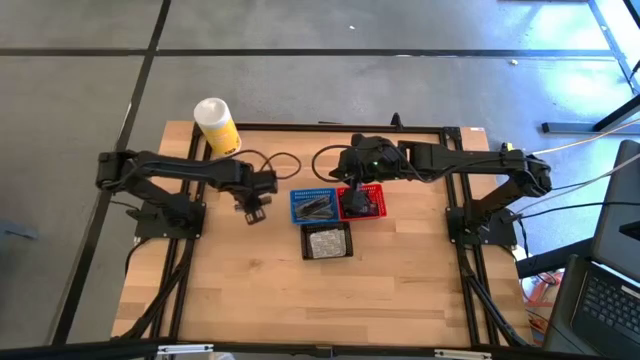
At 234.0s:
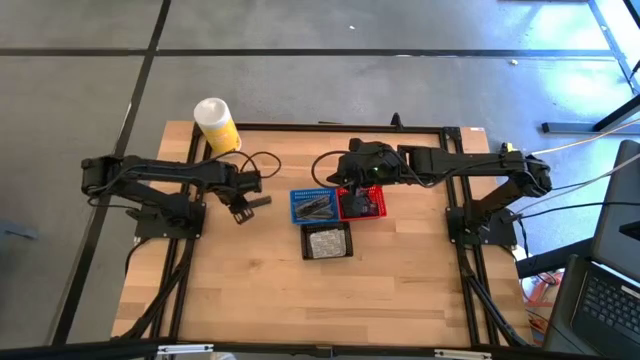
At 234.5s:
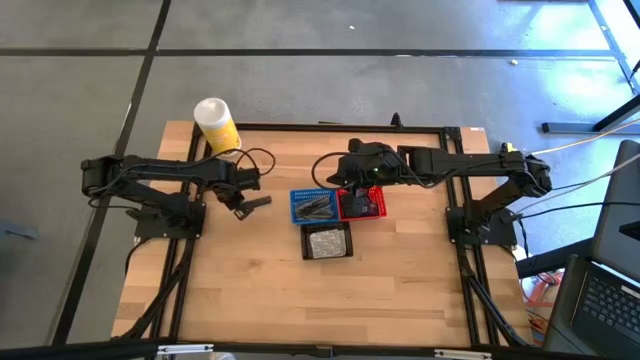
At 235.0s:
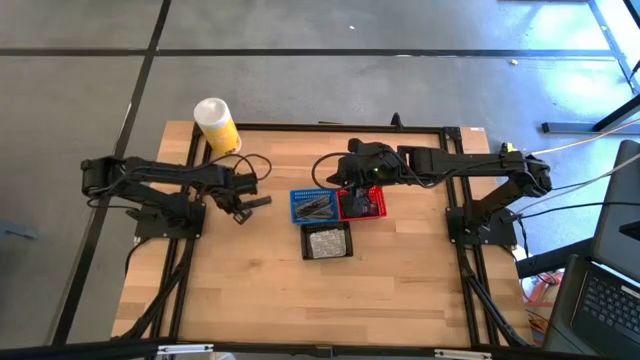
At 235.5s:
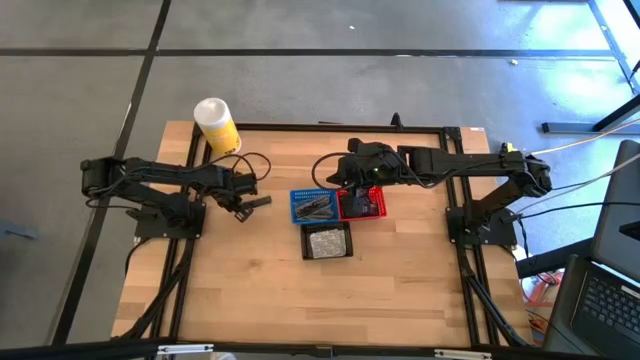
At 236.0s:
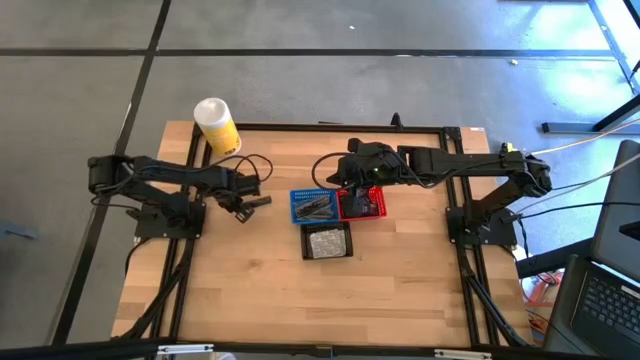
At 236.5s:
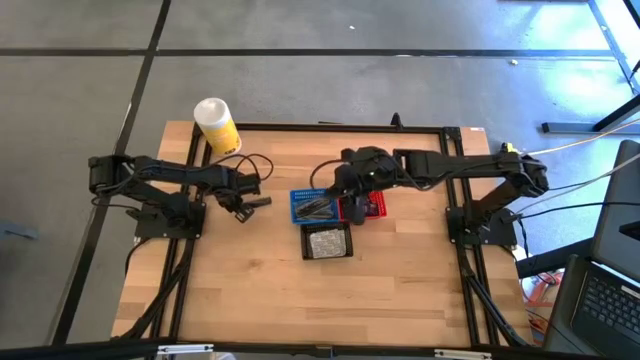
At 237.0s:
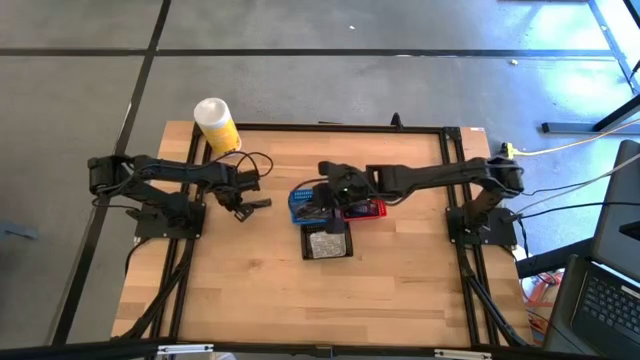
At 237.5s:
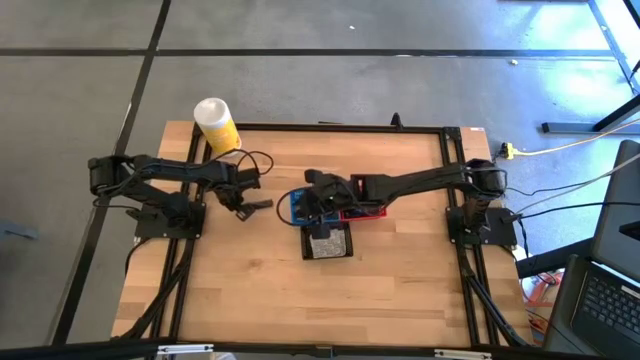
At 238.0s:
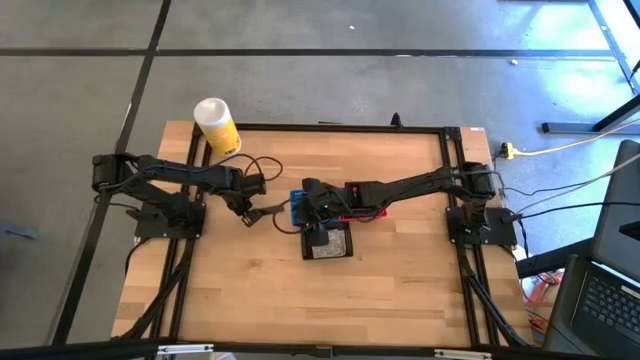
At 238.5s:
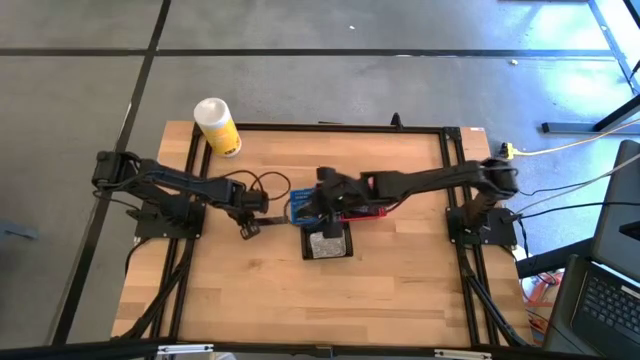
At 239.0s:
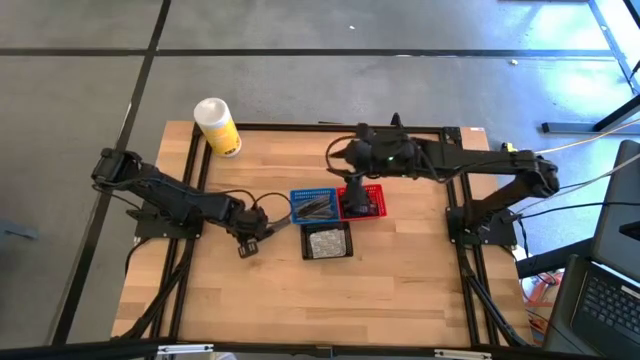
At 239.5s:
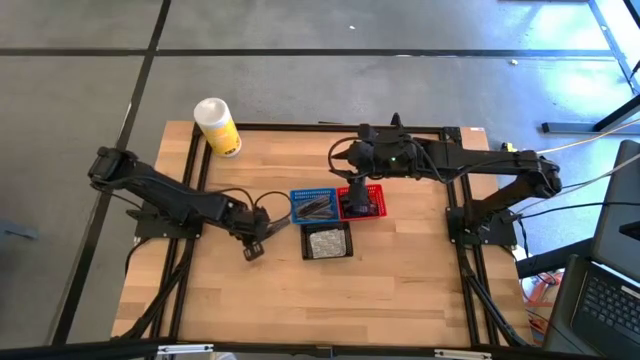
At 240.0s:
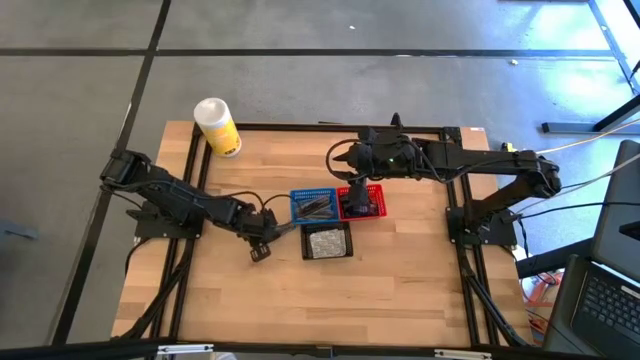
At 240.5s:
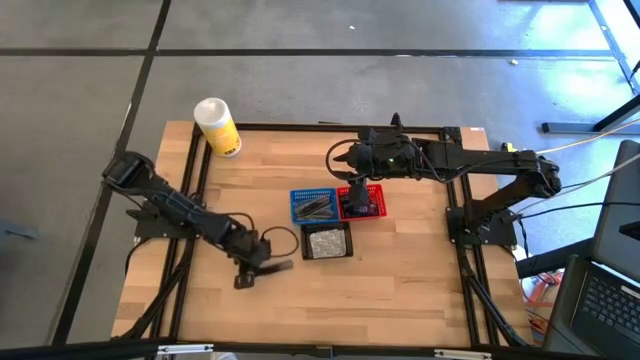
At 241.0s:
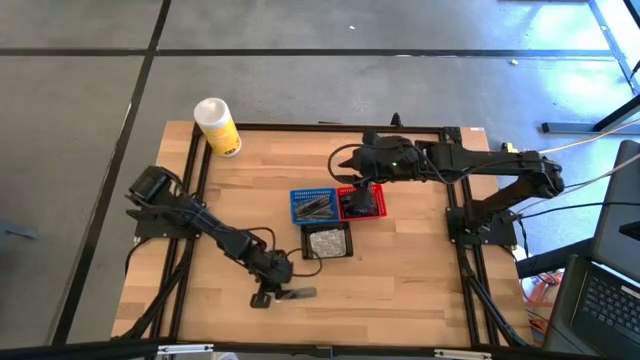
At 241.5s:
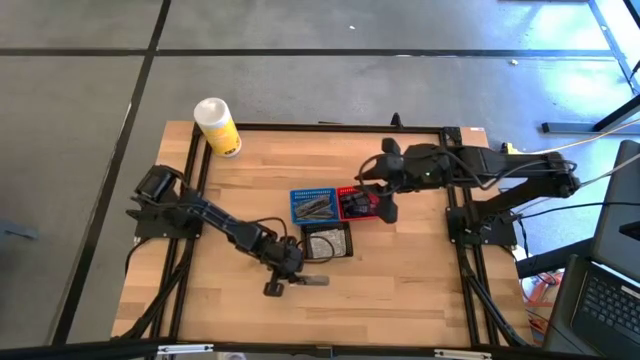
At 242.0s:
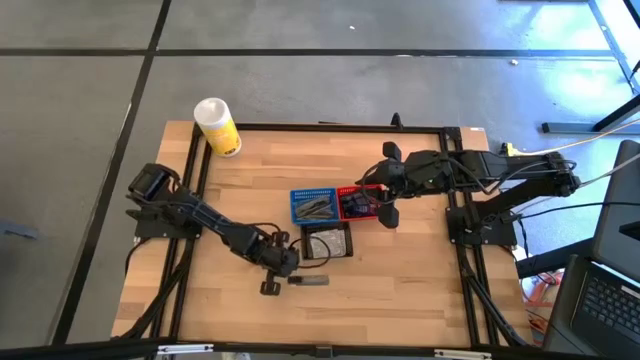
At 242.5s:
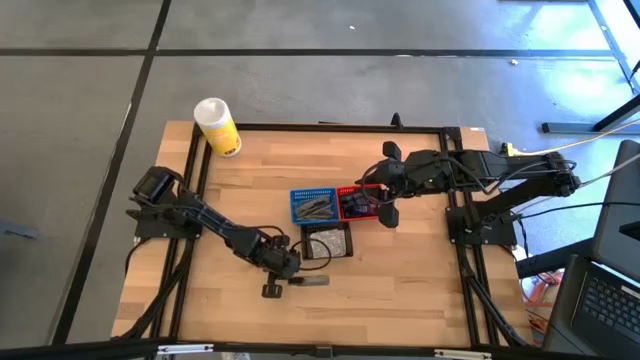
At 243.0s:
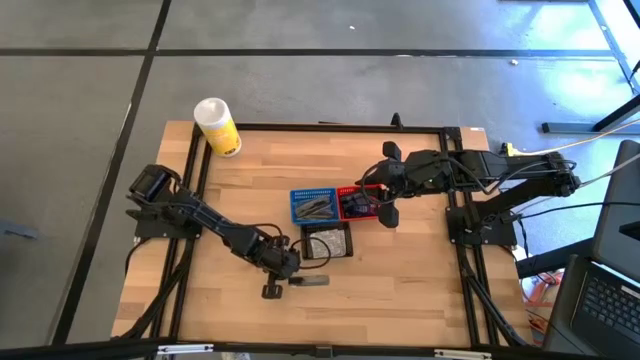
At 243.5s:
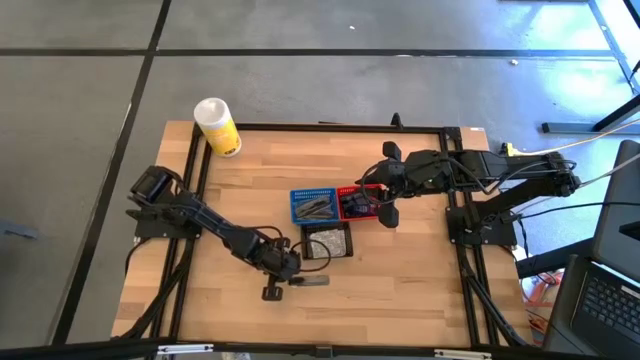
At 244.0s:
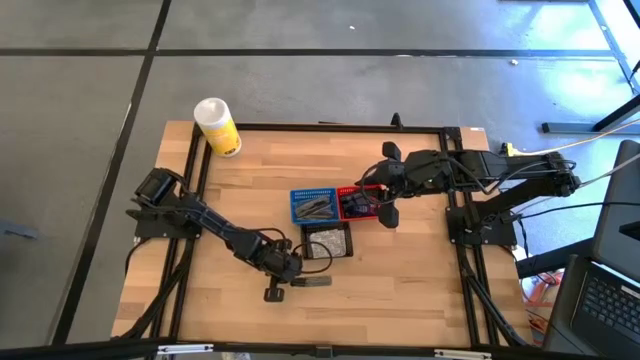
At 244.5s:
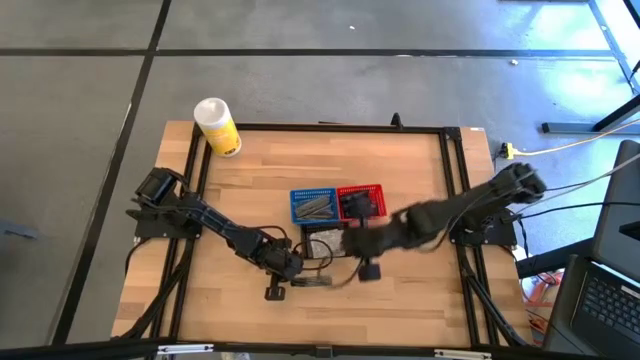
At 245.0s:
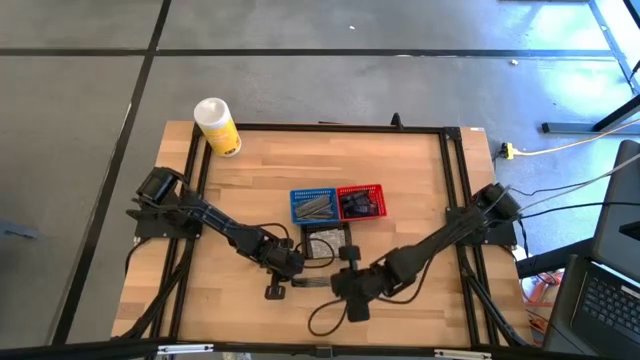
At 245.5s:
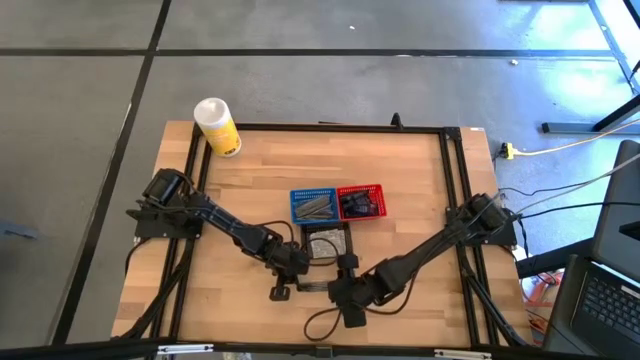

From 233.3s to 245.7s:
Task: Pick & Place Travel size toiletries
Put the black comb into the blue bin

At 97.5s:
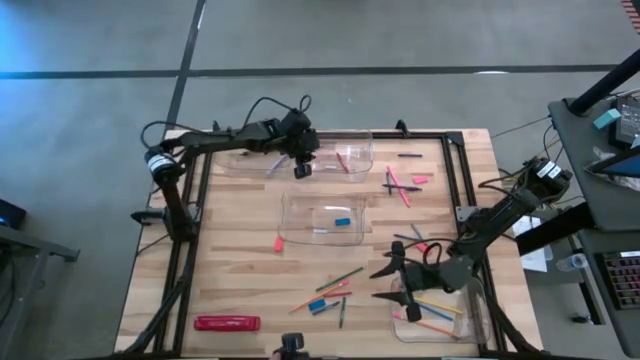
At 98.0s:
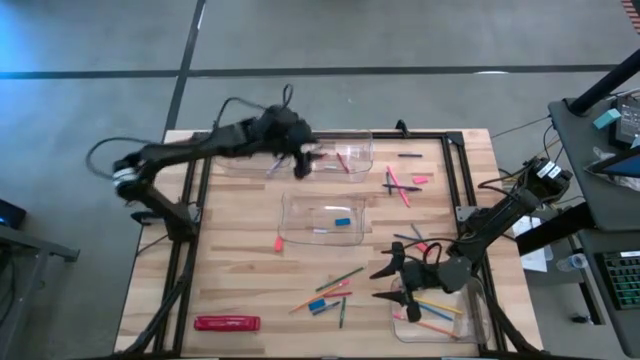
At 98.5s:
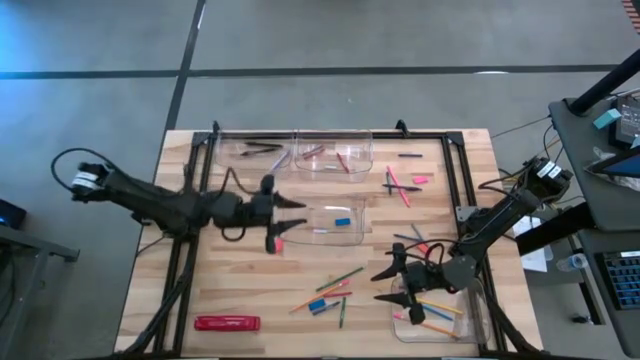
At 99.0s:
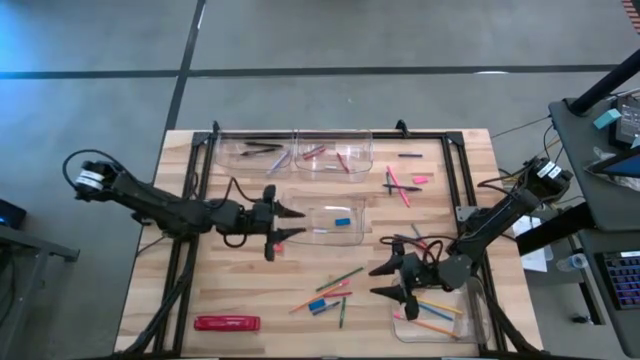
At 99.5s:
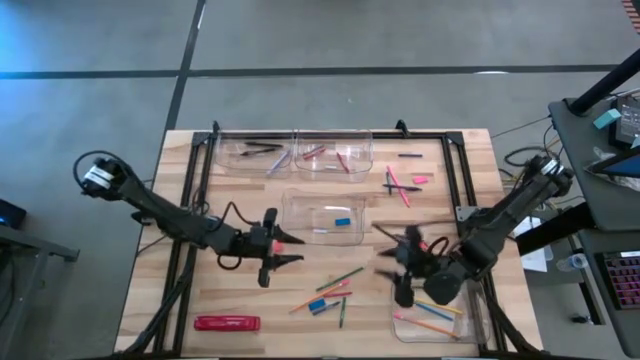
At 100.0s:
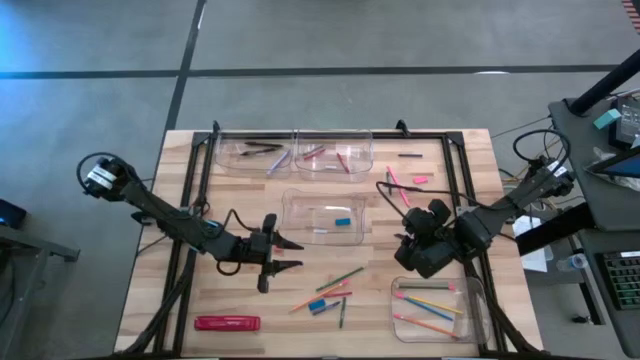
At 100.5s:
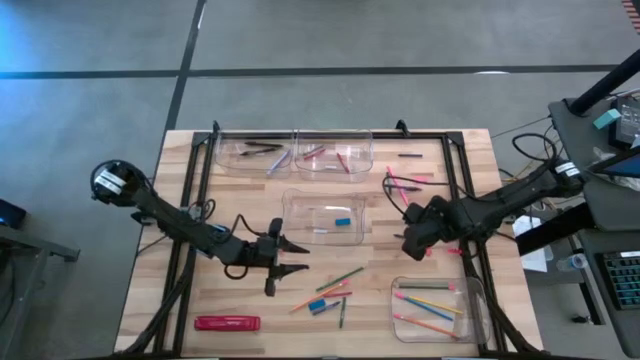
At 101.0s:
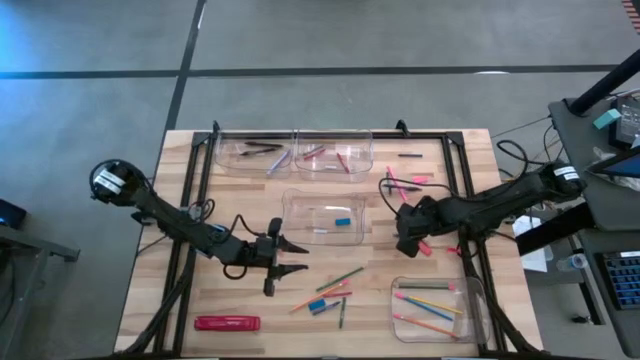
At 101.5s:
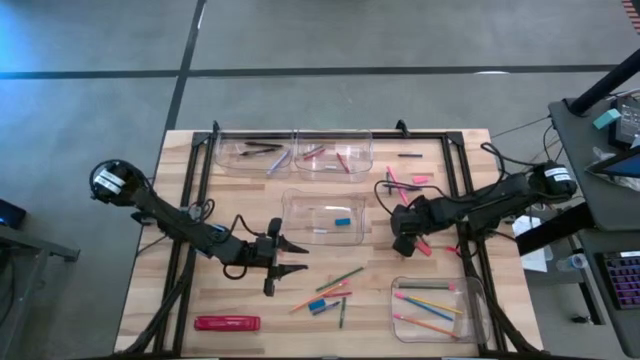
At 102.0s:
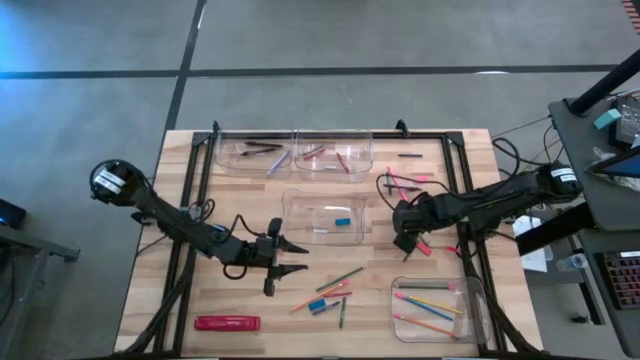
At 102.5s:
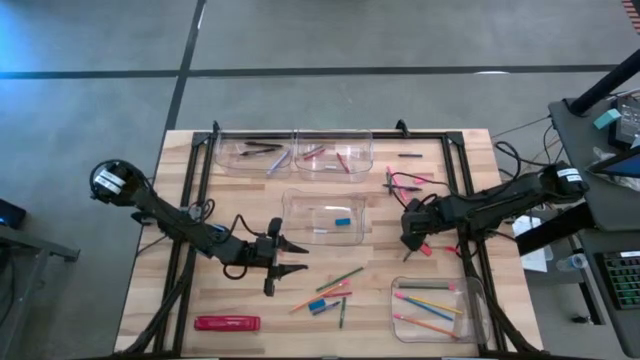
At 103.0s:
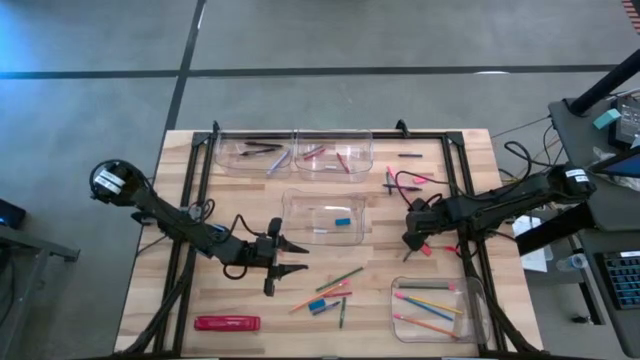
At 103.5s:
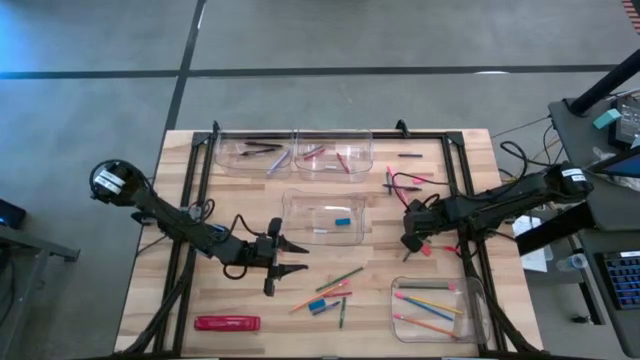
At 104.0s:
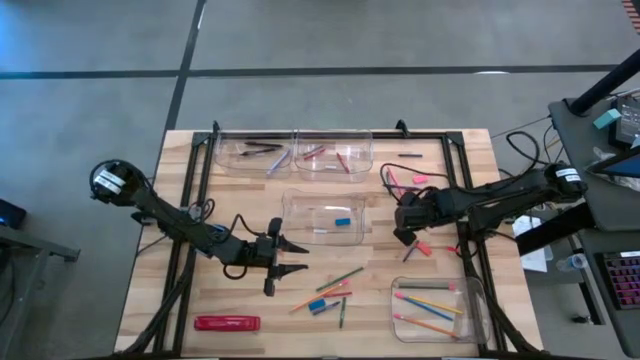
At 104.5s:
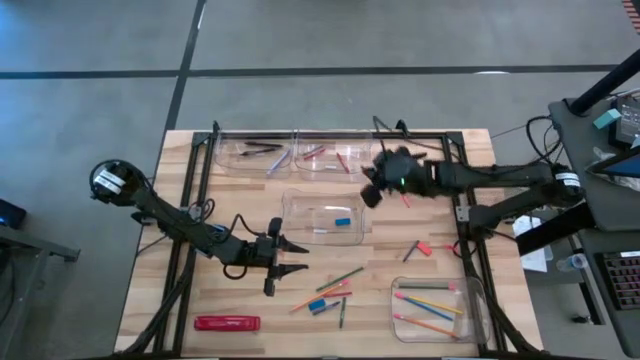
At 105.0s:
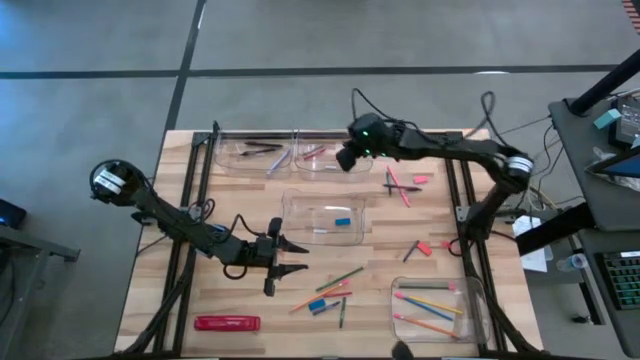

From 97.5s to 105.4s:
Task: Sort crayons/erasers/pens/pencils in bins
Put the gray crayon into the top right transparent bin

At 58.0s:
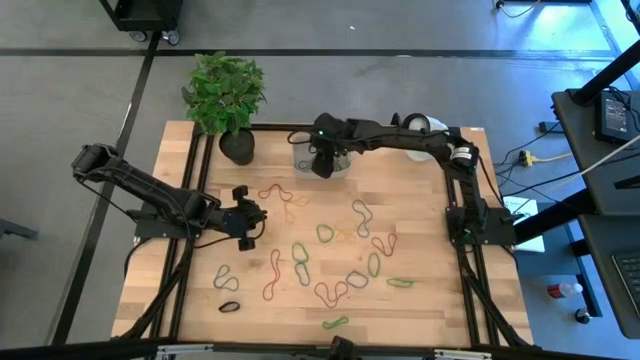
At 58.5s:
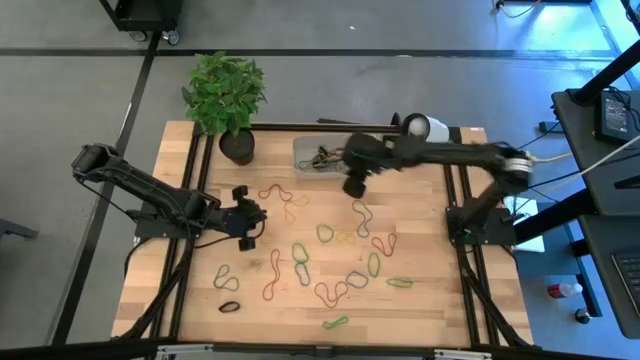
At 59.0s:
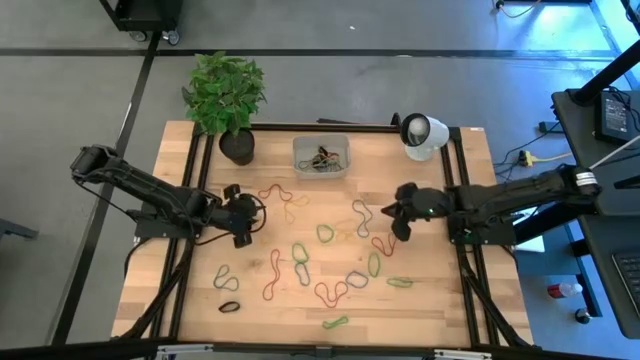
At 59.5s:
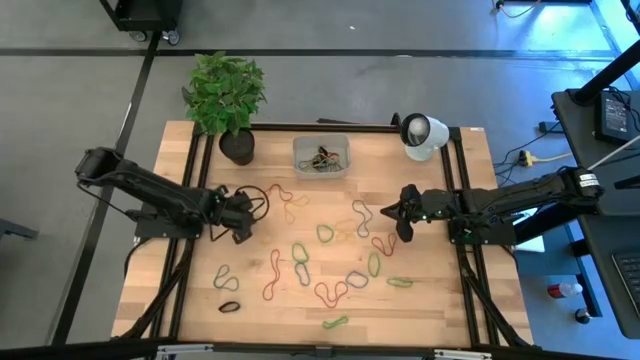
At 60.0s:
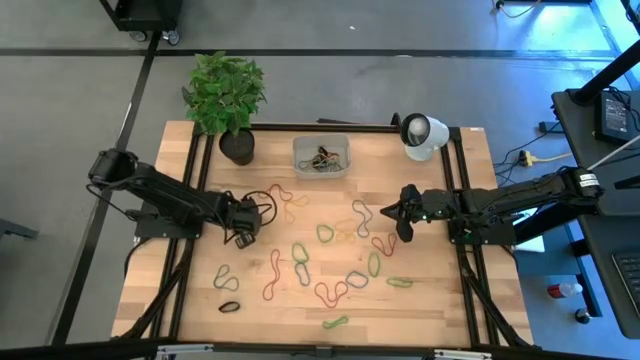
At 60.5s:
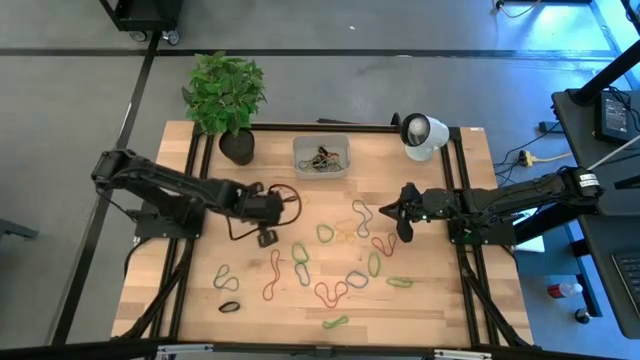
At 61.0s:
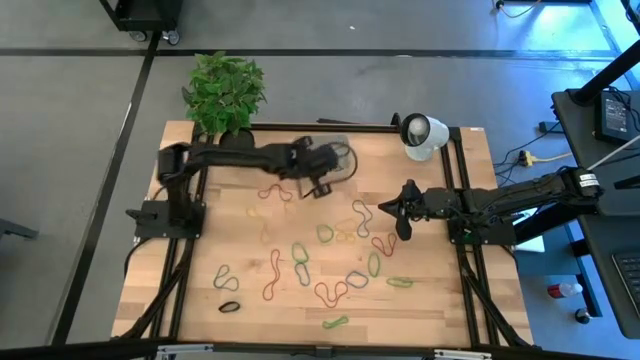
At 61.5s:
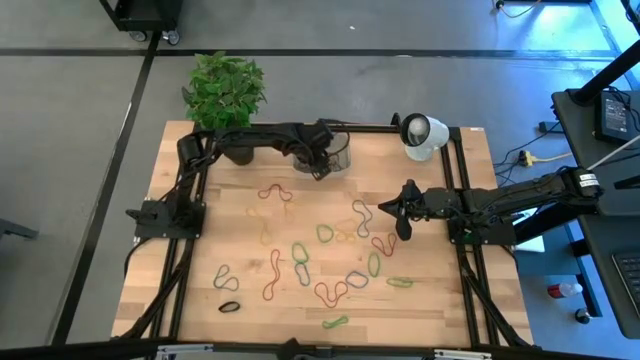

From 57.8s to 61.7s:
Task: Pick and place rubber bands into bin
Put the black rubber band into the gray bin
